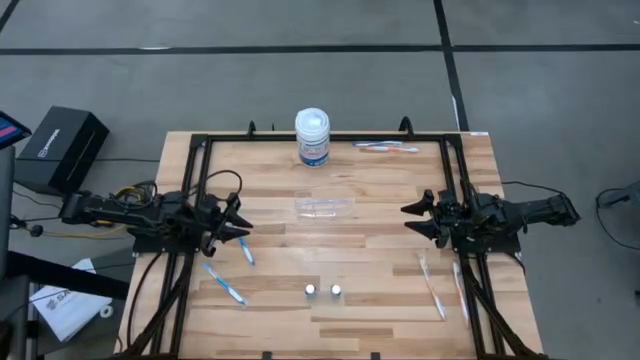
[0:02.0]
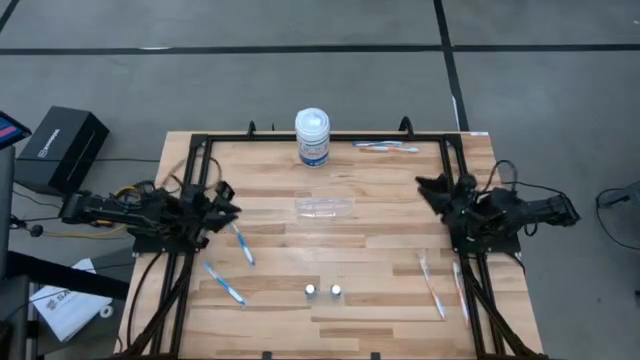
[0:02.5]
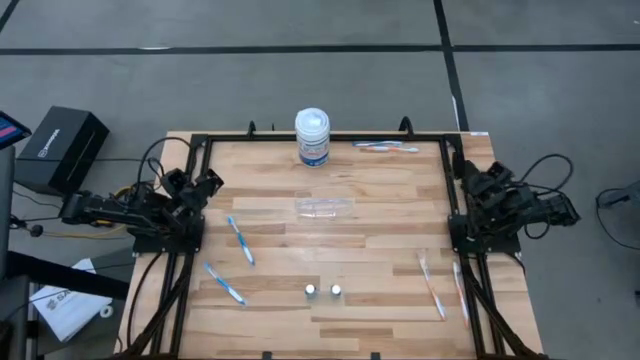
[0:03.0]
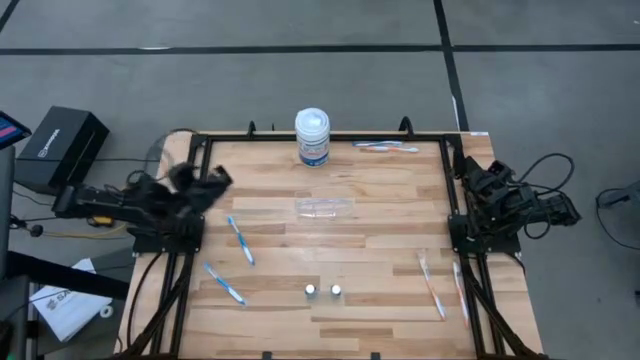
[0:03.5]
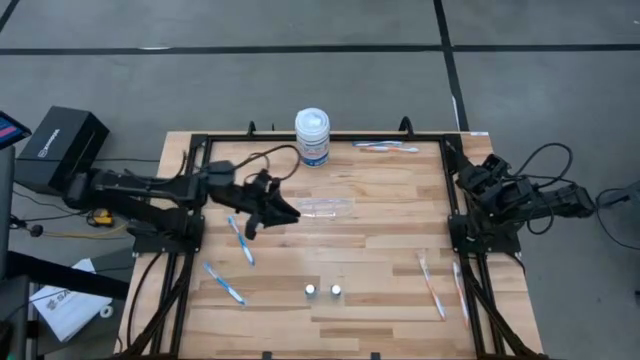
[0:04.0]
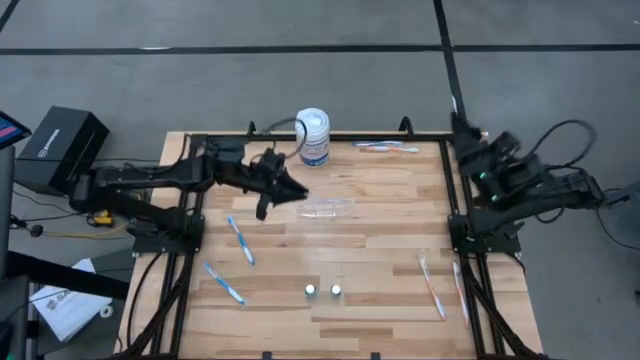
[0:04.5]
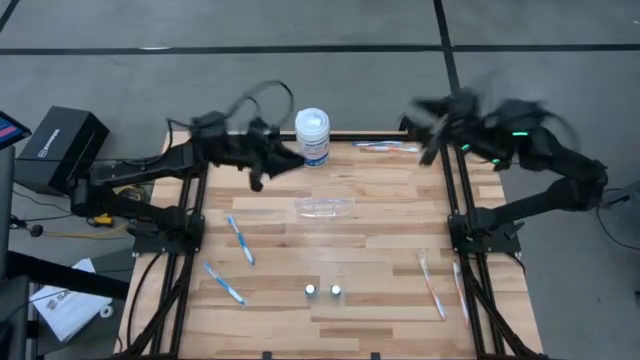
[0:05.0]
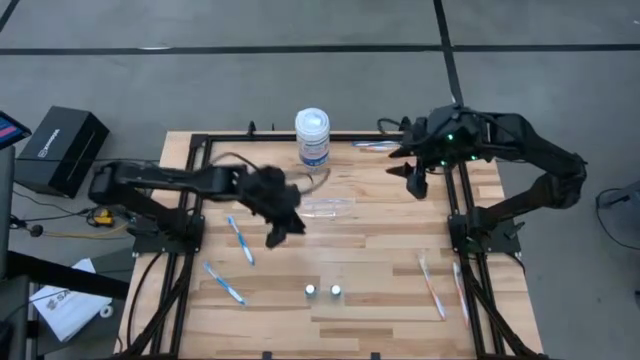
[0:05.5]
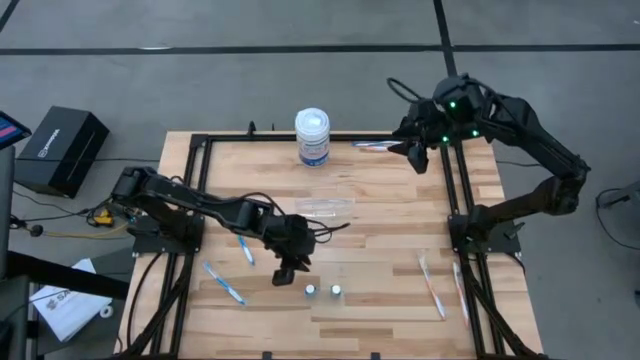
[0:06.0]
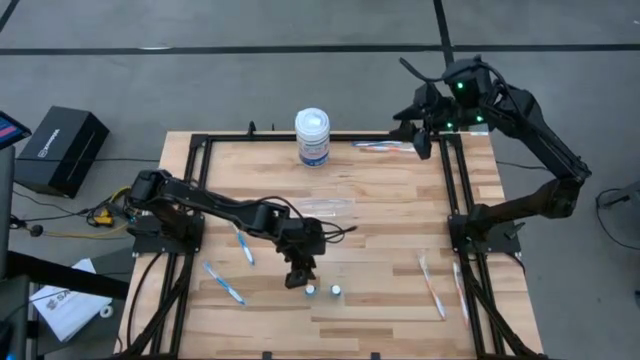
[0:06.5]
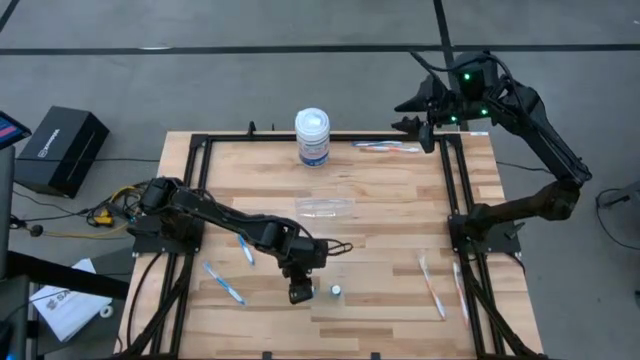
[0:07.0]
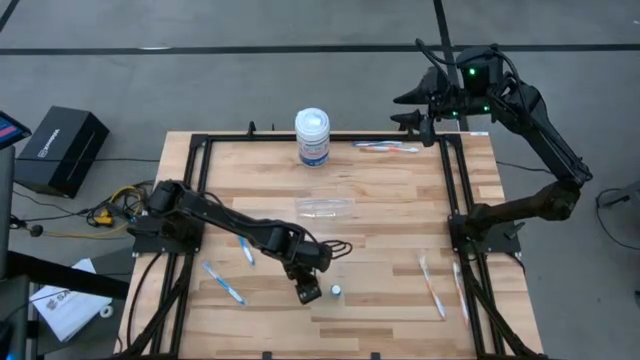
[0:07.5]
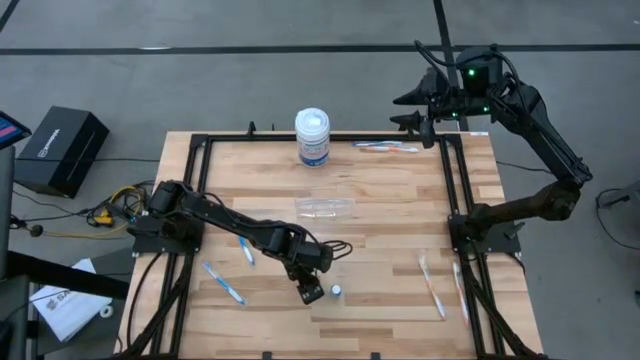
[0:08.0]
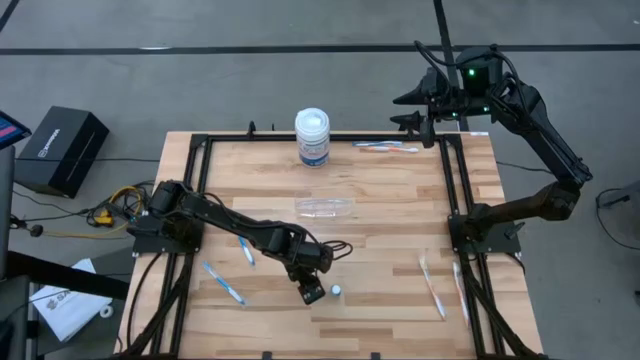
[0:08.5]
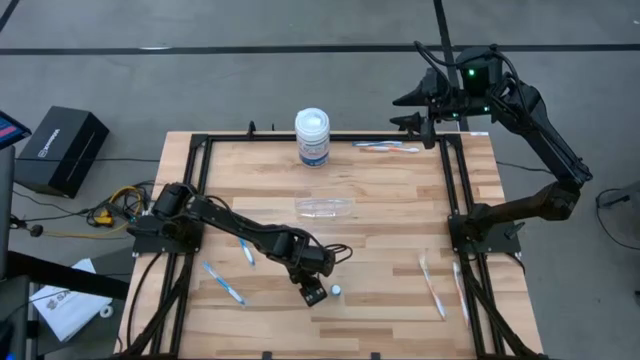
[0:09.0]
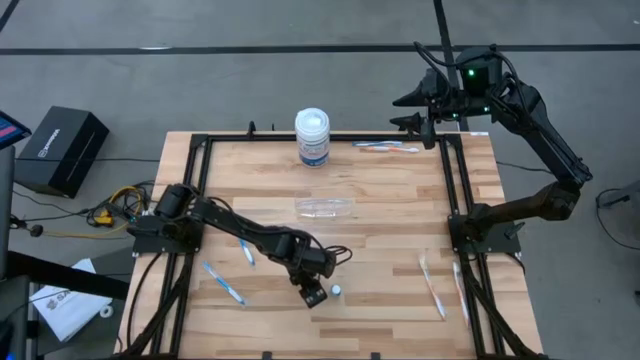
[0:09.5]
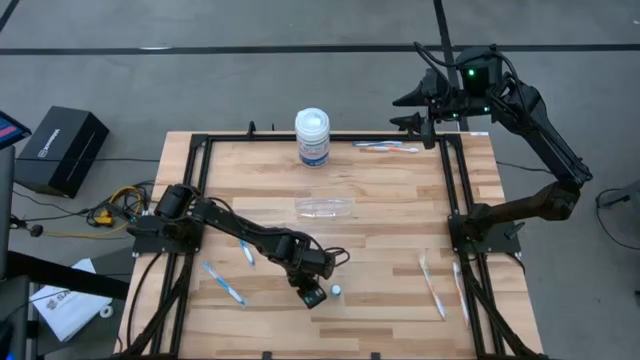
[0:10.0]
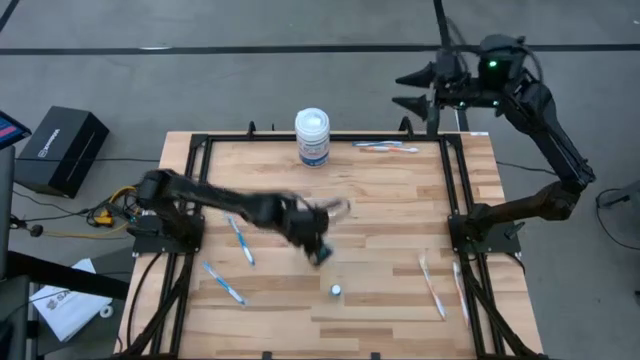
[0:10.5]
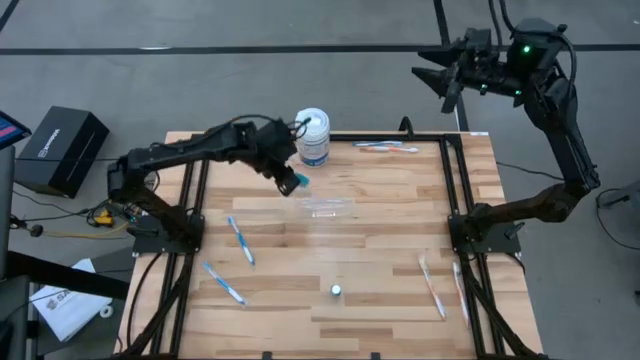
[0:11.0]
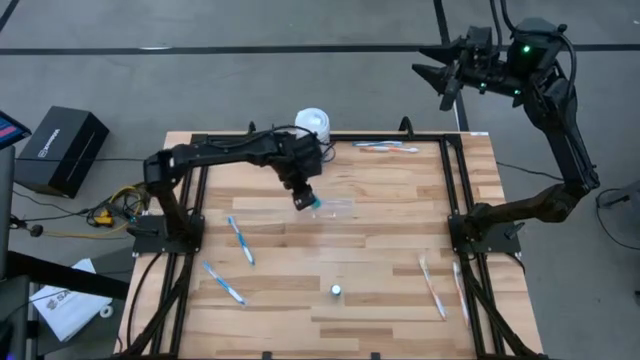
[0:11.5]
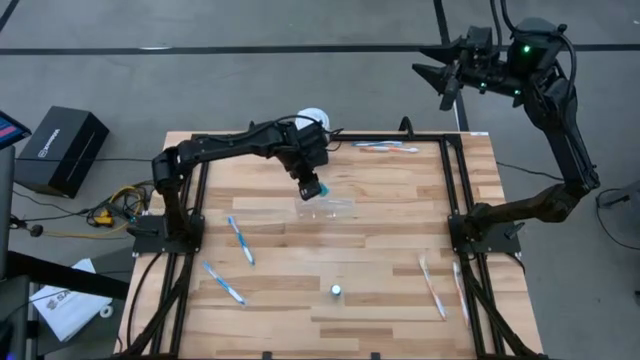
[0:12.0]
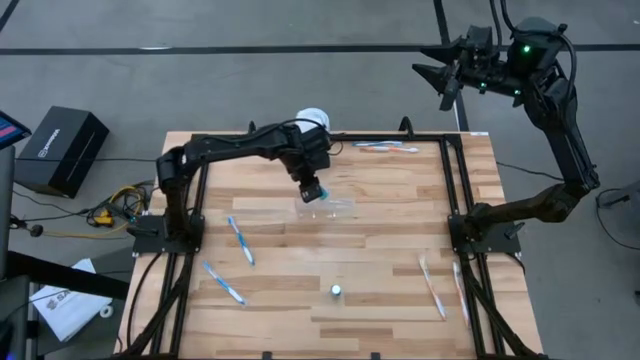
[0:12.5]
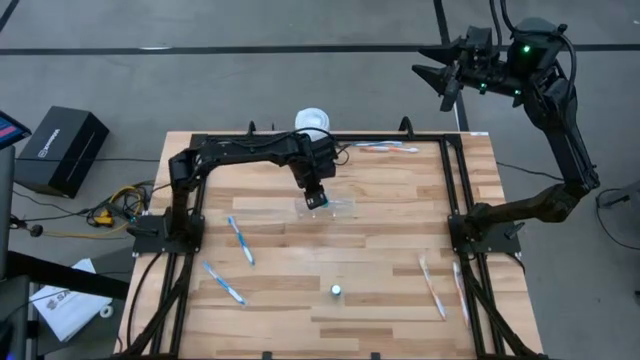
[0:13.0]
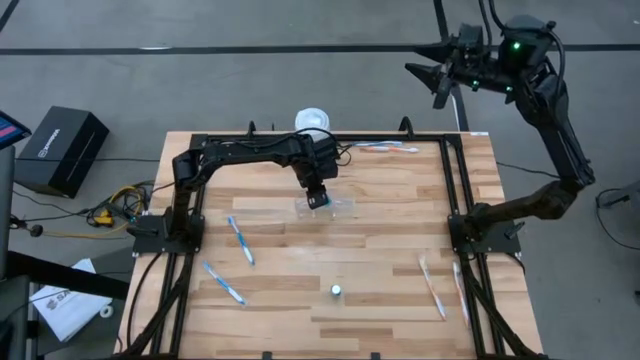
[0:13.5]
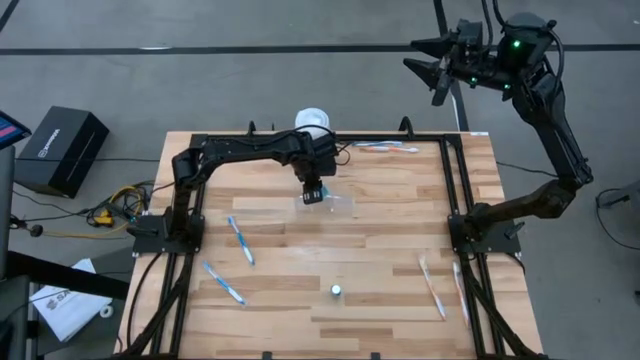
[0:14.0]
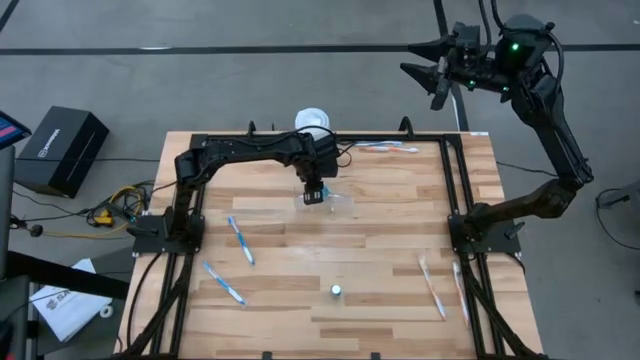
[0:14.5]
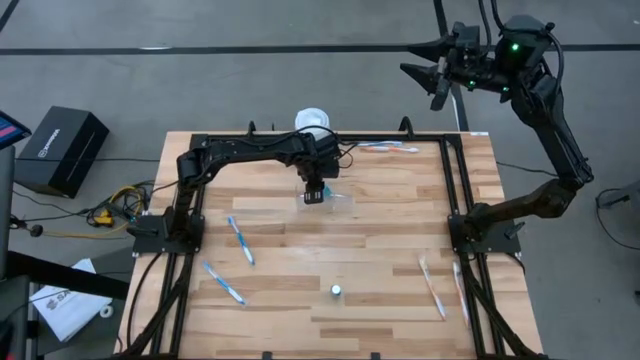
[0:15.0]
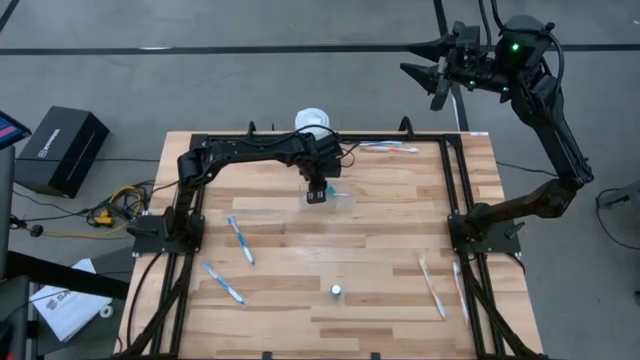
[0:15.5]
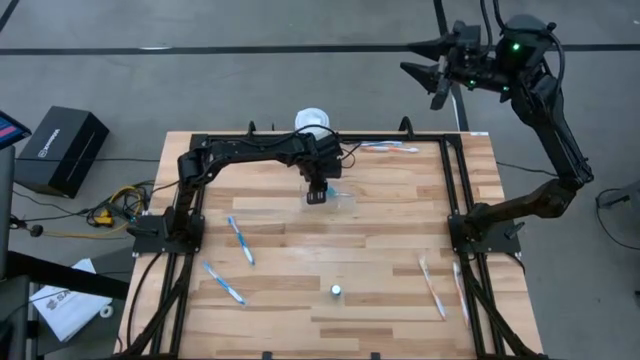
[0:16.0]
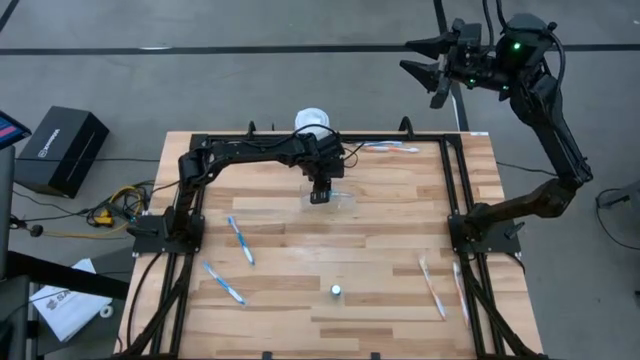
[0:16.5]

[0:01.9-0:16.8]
Task: Pick & Place toothbrushing station
Put the left mouthwash into the transparent organizer

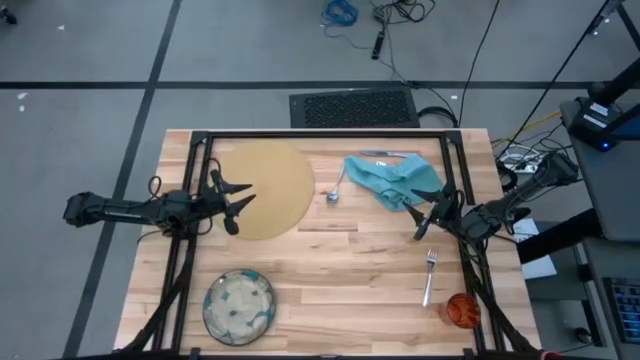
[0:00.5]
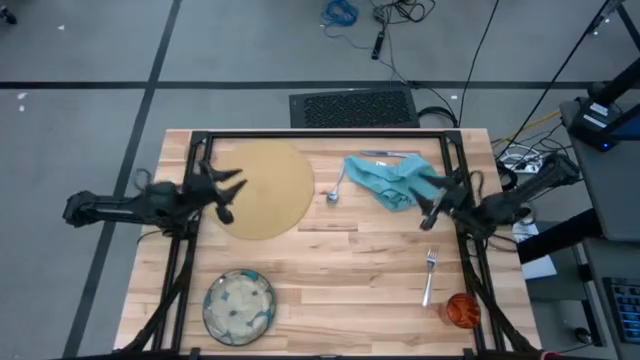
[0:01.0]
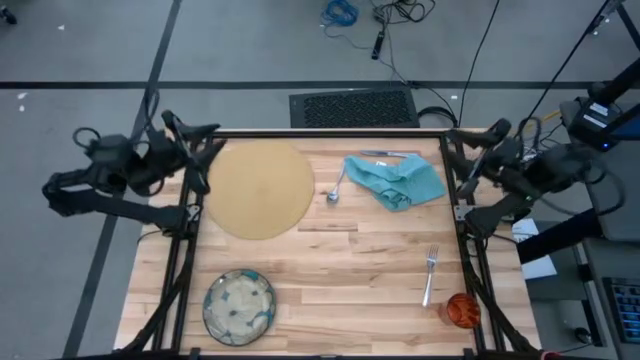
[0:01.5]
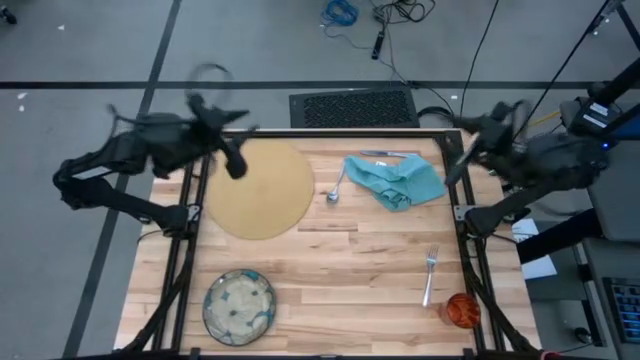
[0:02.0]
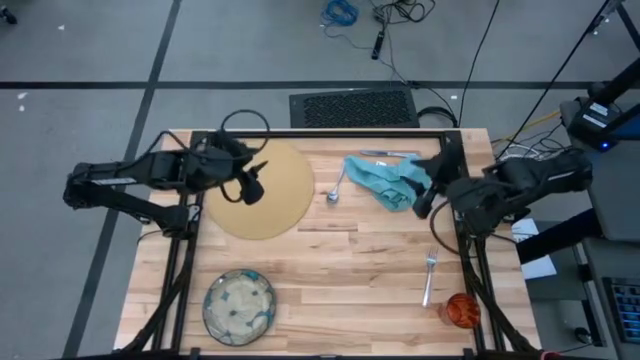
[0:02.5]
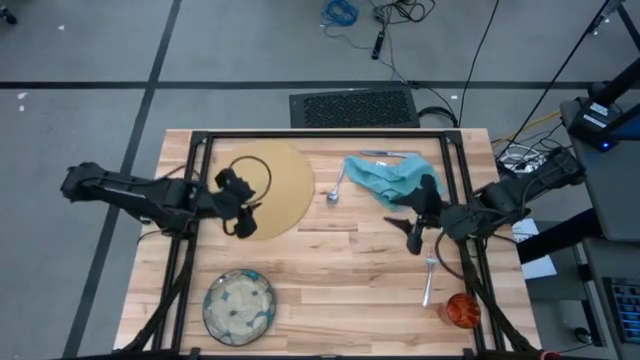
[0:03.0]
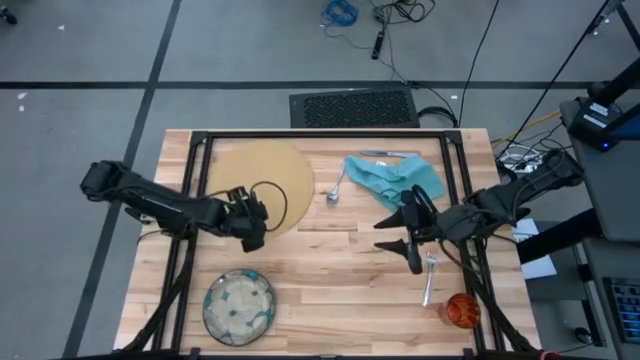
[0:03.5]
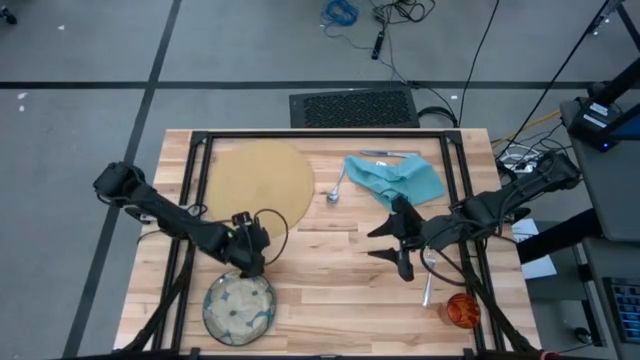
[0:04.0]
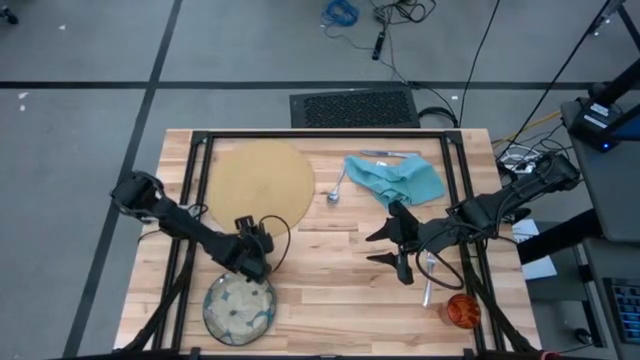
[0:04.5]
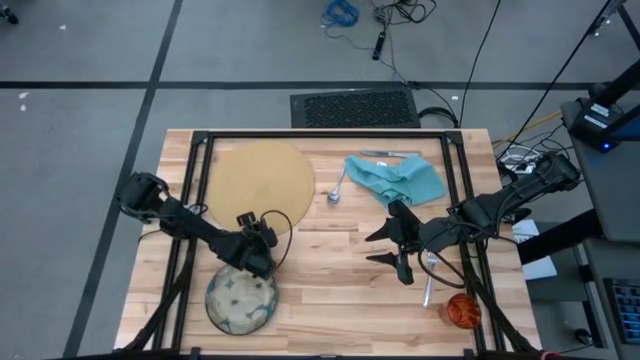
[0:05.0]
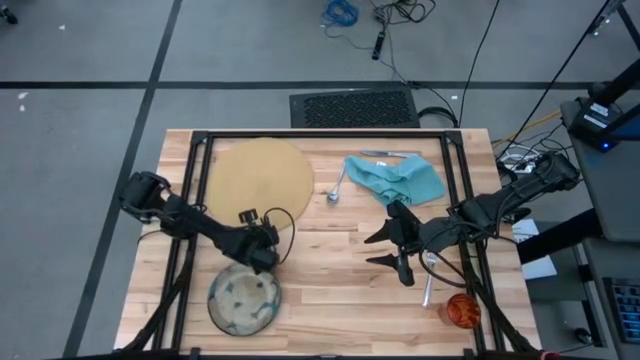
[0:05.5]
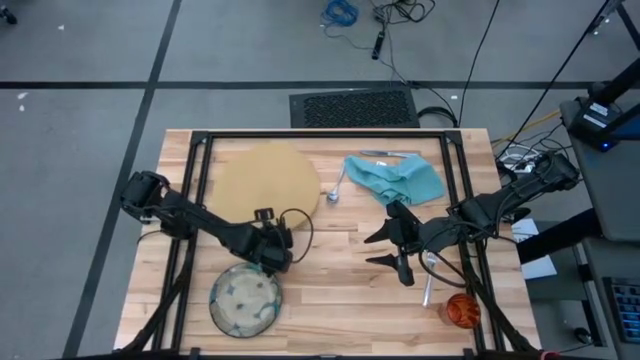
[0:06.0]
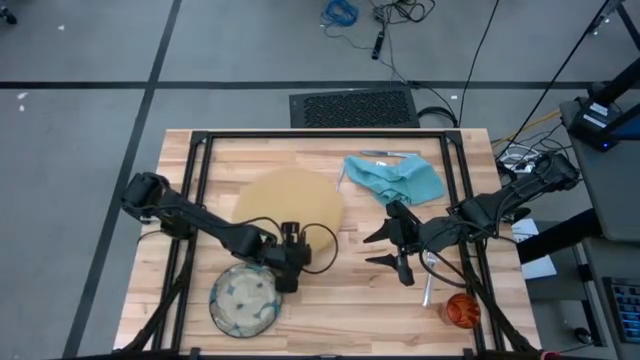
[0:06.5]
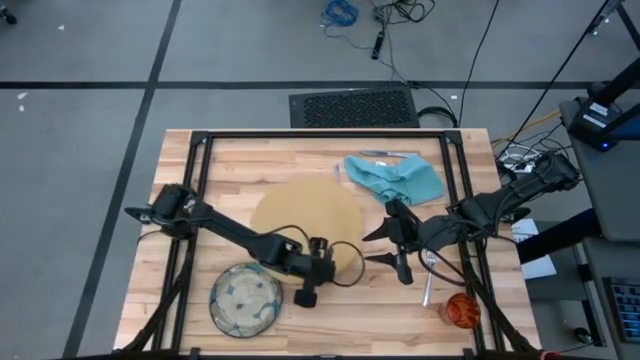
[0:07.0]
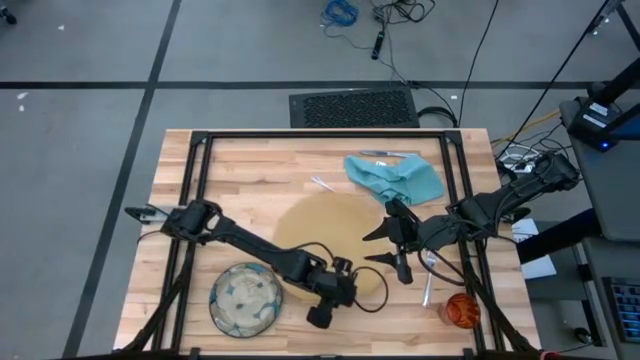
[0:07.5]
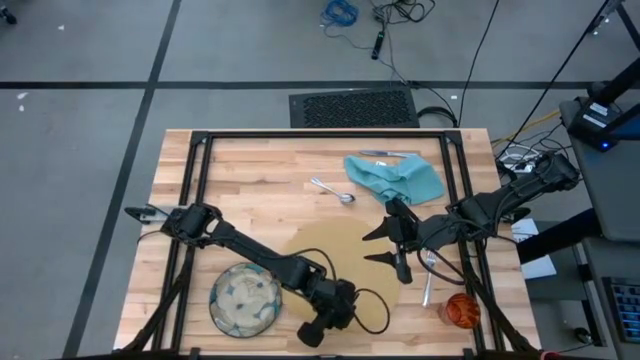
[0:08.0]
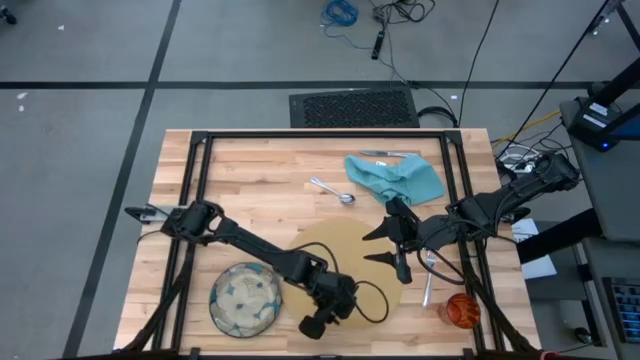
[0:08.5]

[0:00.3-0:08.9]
Task: Set table place
Move the brown mat to the center of the table
